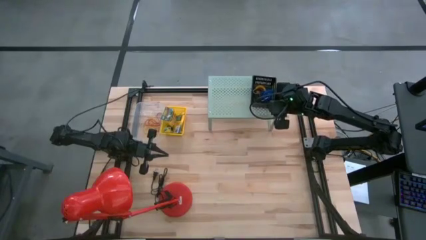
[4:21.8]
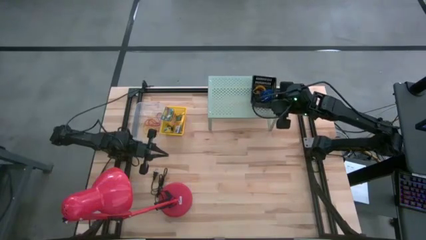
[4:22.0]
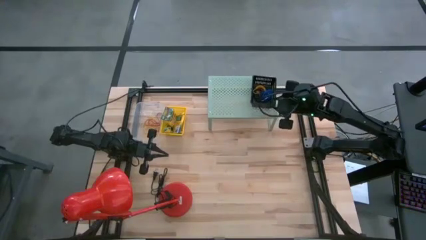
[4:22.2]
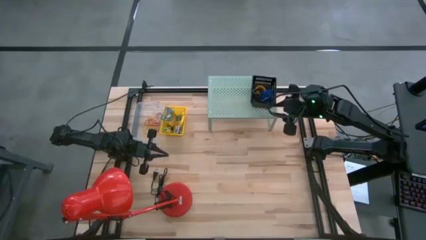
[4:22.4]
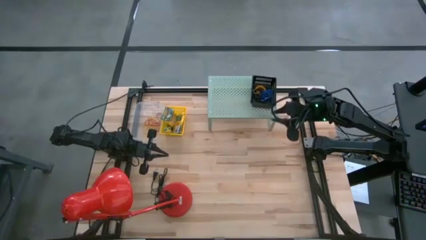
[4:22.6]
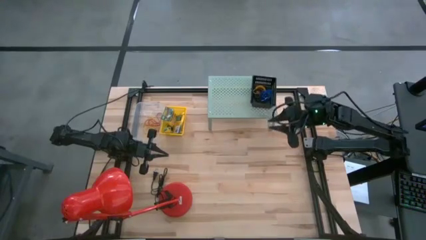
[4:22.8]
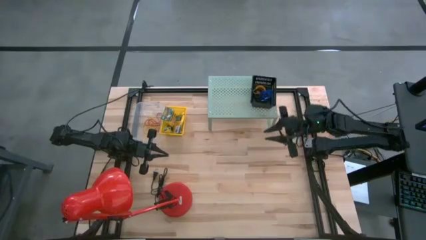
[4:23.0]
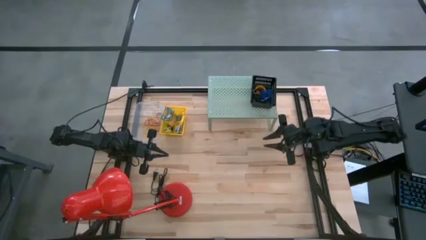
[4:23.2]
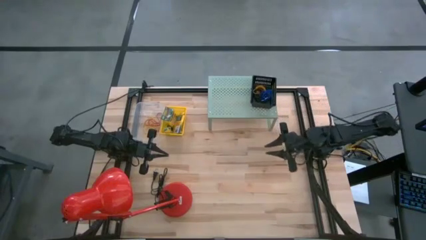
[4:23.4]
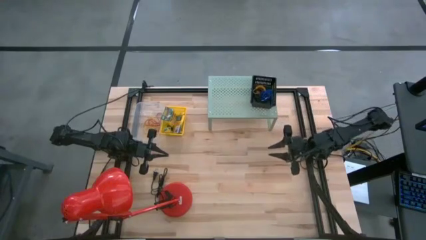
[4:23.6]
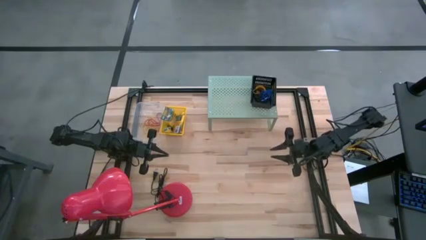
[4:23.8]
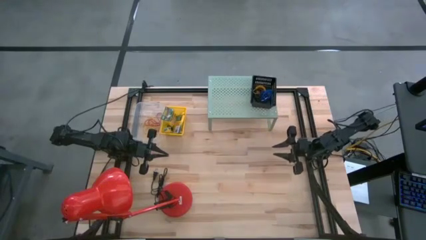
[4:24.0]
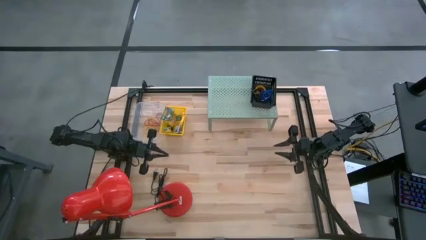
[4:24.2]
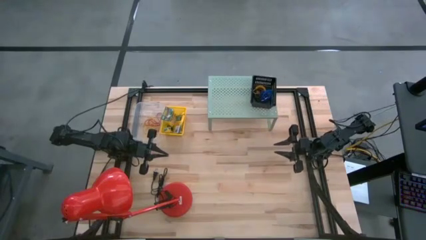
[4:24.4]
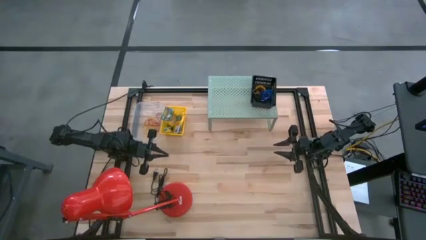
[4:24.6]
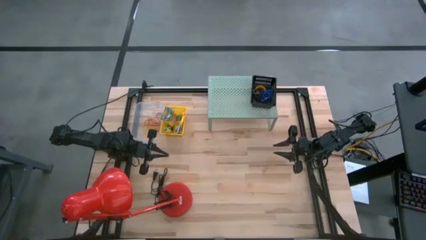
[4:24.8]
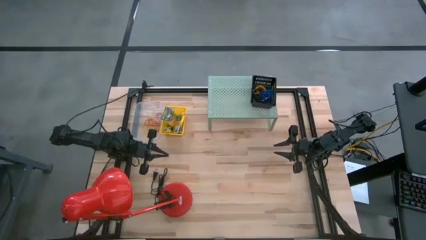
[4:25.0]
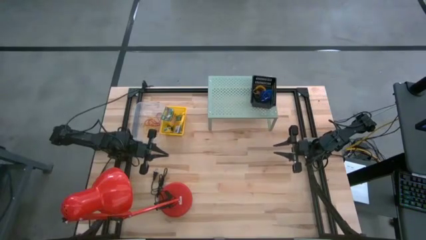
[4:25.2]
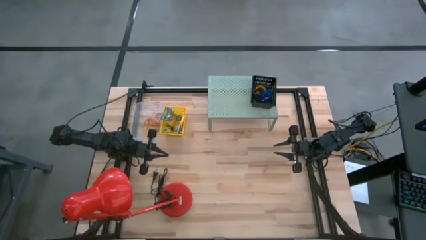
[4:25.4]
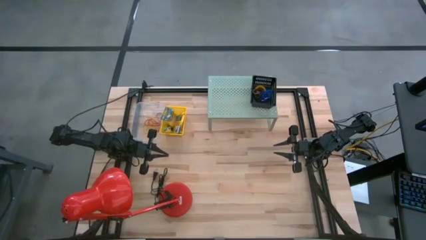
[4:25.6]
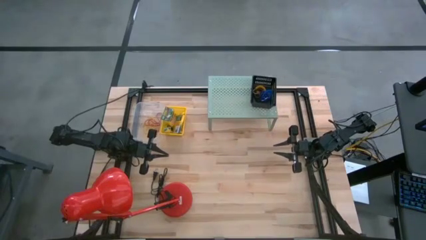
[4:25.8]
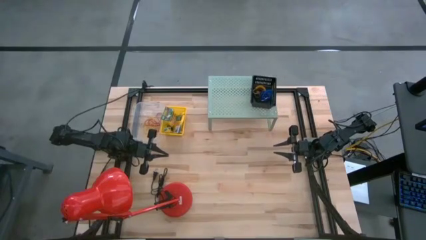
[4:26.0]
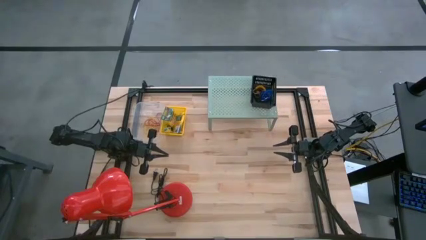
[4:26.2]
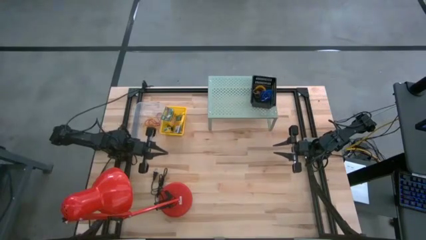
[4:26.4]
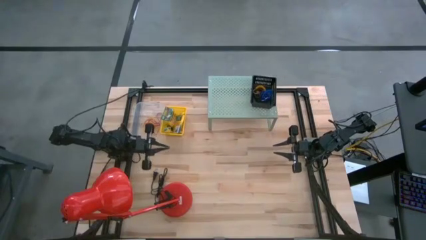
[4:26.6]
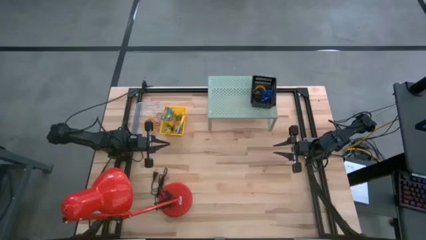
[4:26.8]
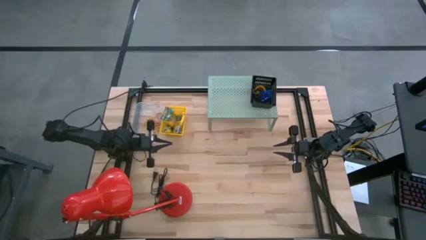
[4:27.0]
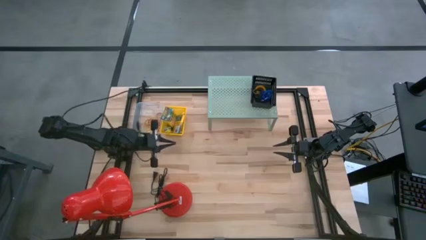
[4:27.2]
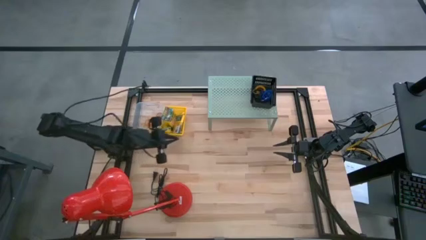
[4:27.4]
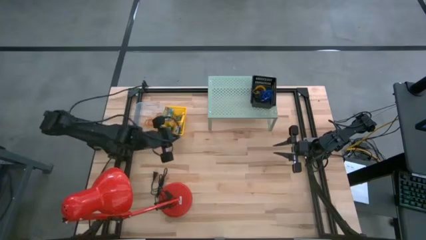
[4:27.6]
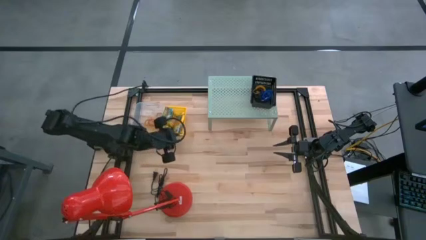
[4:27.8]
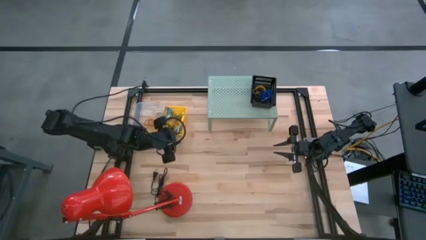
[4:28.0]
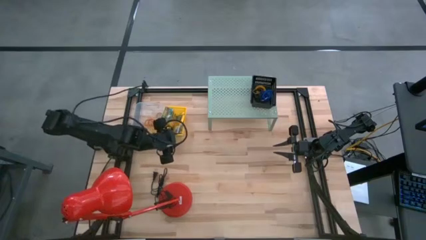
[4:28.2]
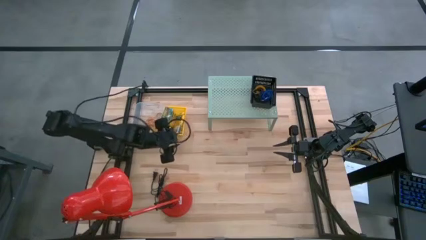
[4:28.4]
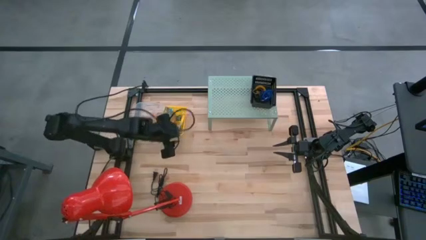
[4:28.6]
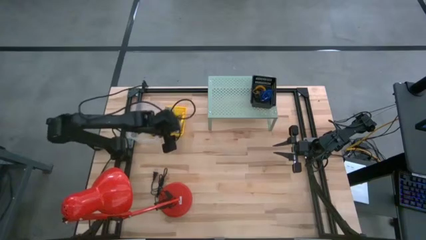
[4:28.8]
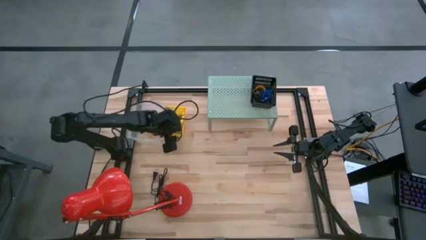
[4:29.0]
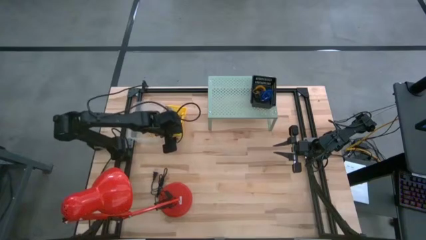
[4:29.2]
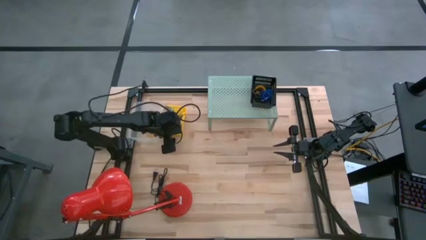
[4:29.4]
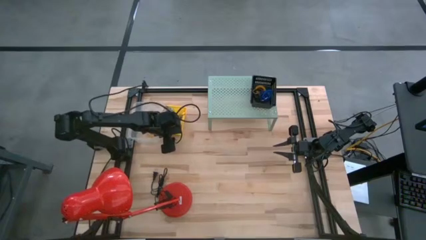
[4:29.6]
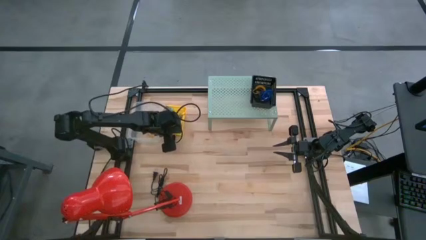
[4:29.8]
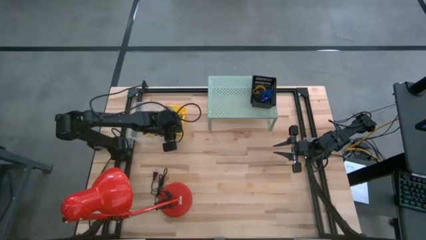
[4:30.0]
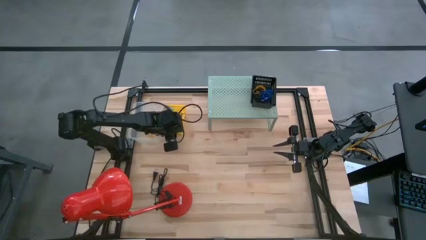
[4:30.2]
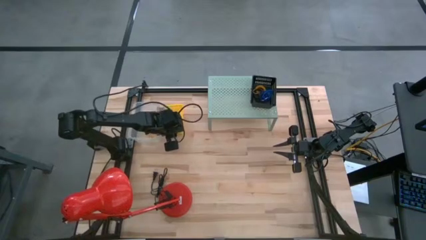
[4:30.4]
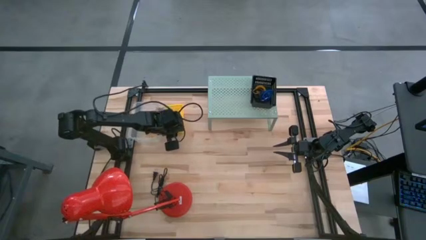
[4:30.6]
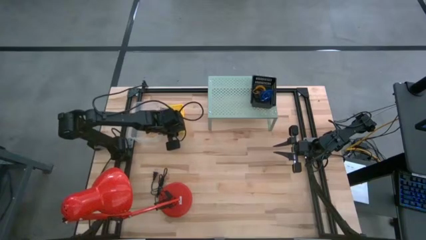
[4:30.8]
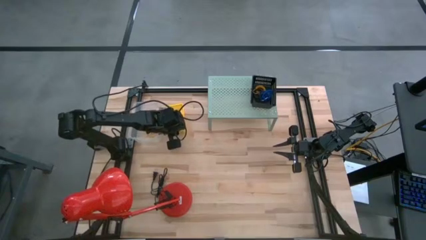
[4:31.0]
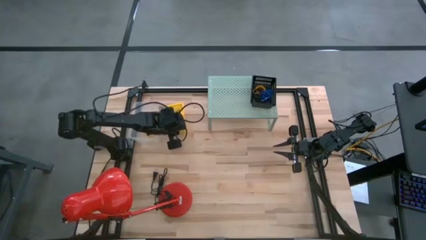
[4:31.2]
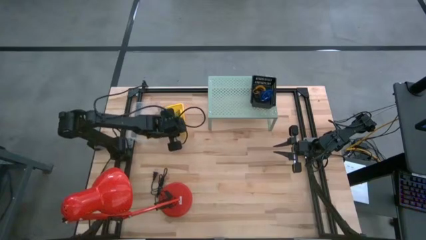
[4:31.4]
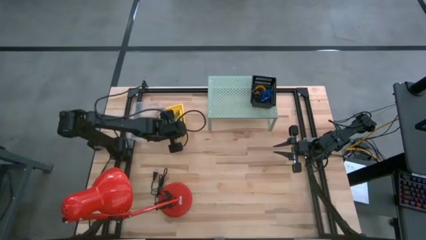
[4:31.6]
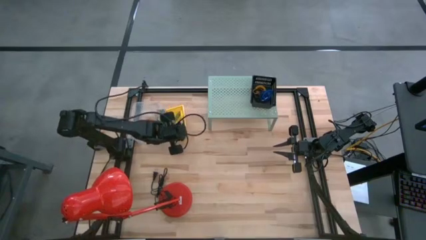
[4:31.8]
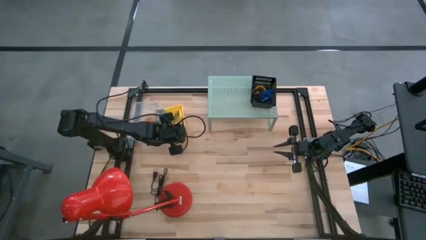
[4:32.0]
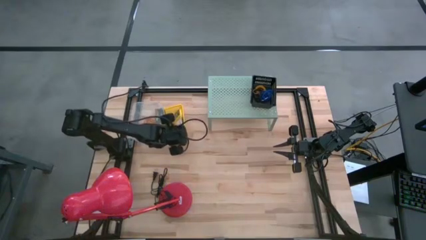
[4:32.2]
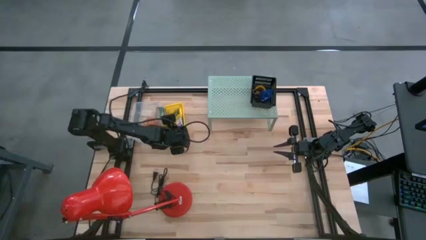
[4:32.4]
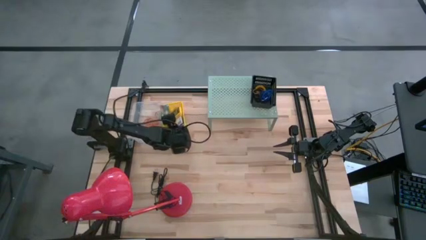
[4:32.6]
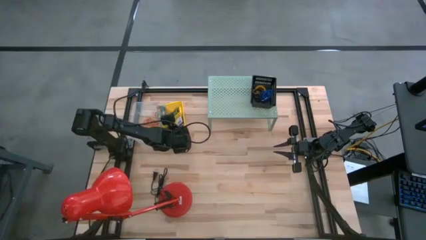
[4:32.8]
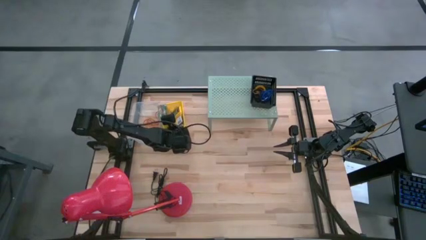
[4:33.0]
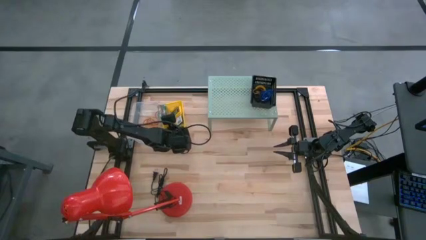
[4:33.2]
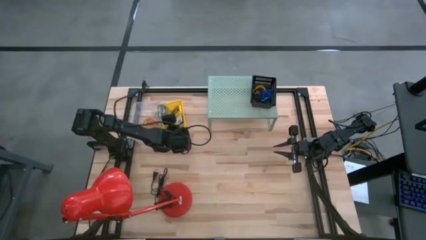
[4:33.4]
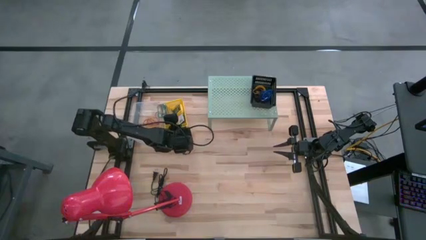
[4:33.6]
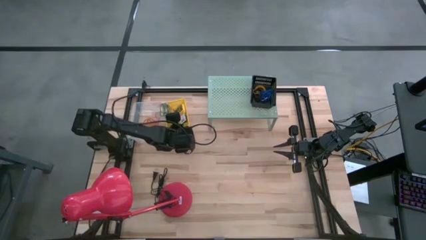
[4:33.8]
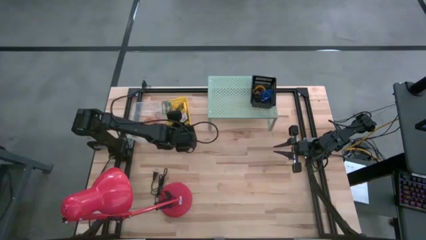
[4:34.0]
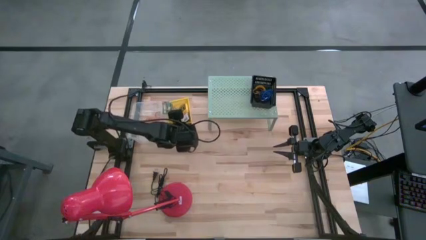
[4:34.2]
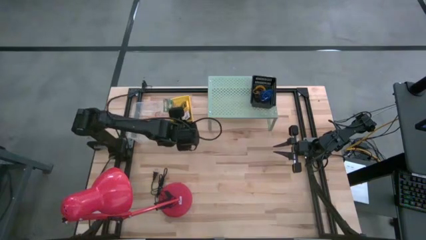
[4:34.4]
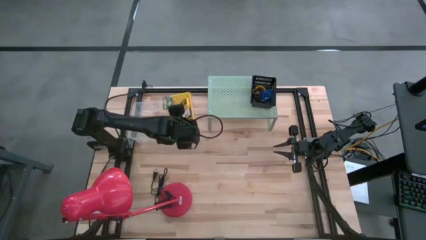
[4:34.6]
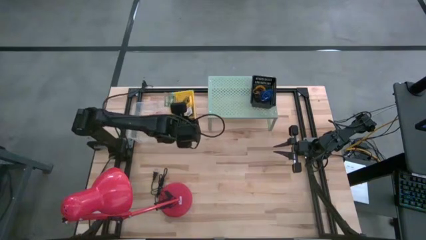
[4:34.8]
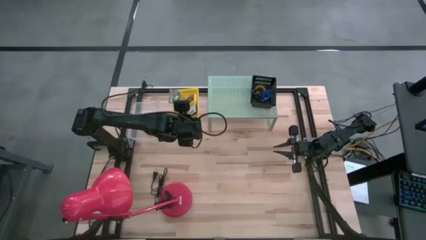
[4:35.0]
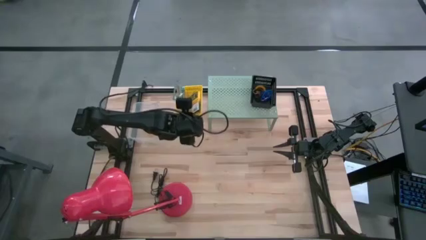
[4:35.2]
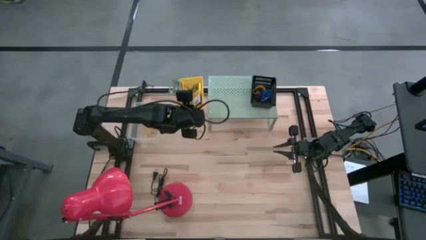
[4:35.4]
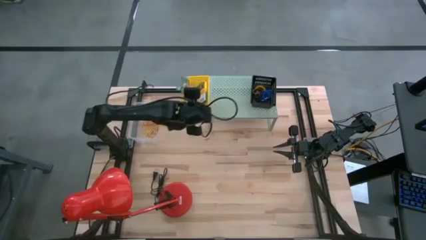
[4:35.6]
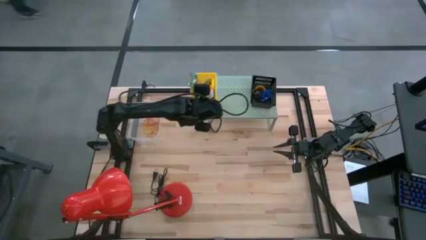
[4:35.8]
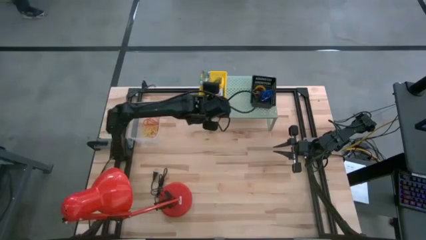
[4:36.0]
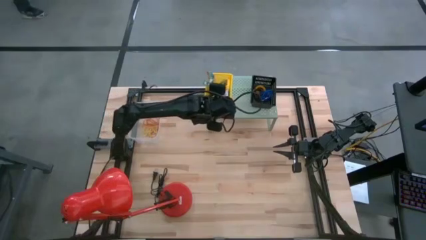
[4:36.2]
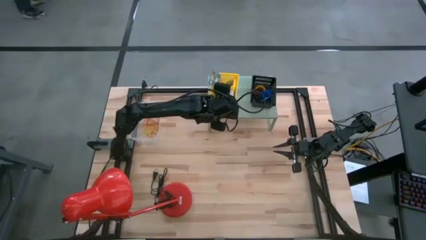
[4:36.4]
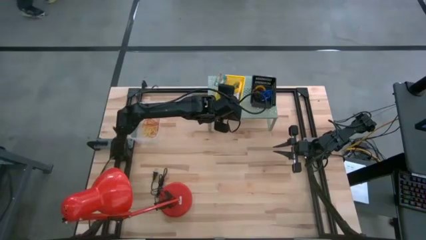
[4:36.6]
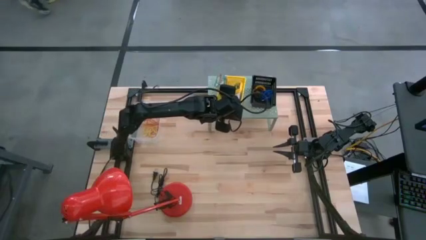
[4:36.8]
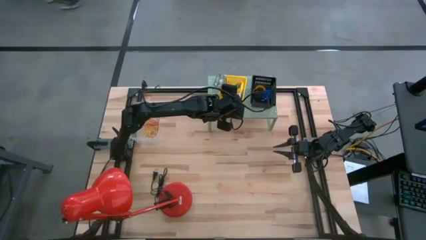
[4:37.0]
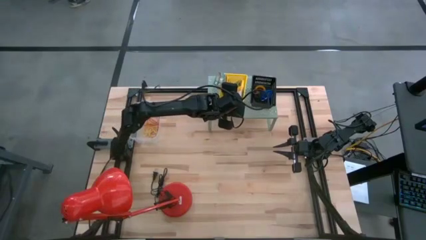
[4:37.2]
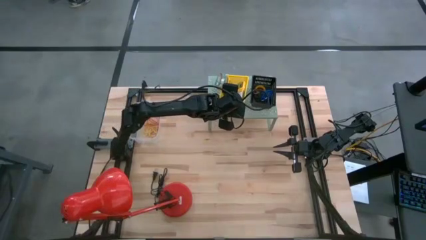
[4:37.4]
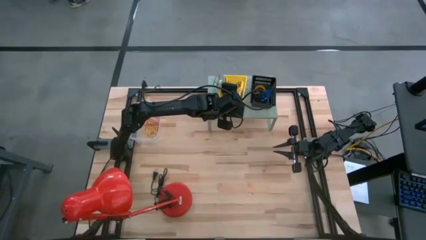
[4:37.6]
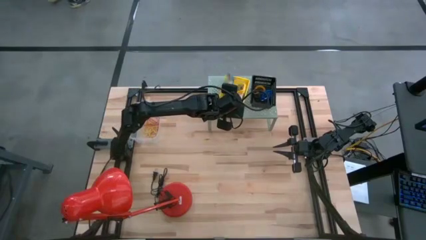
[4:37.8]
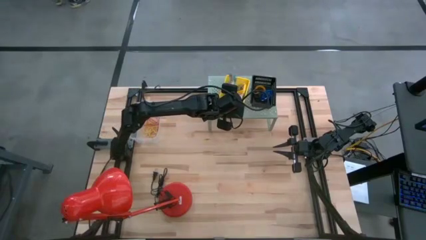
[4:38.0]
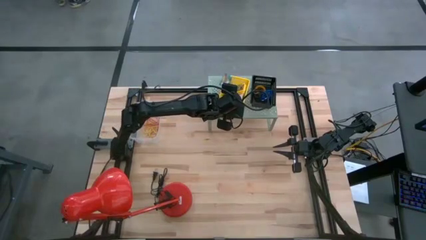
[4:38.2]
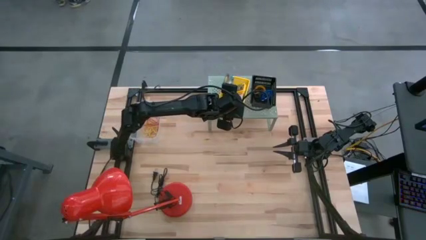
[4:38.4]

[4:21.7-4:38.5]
Task: Pick & Place Office Desk Supplies
Put the yellow bin with the crayons on the shelf
